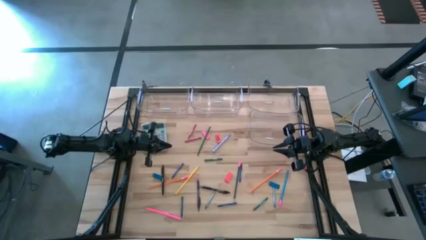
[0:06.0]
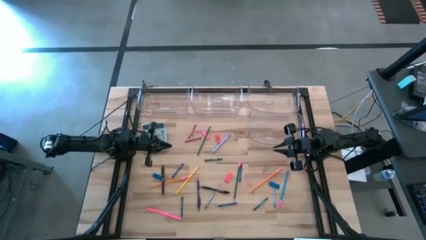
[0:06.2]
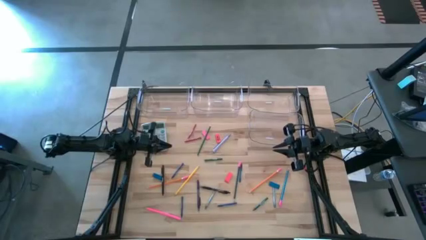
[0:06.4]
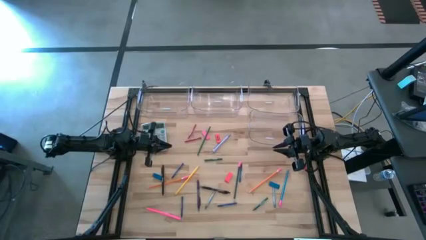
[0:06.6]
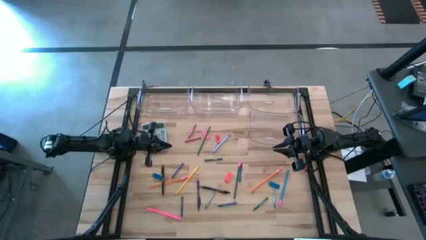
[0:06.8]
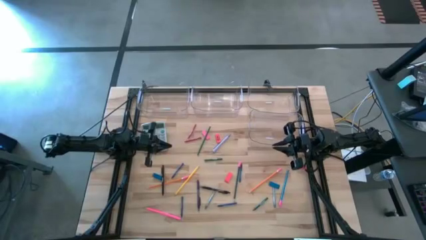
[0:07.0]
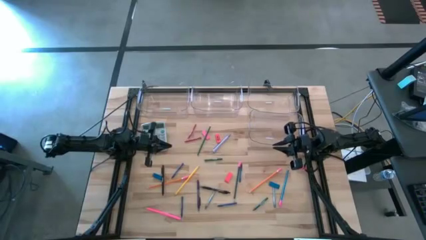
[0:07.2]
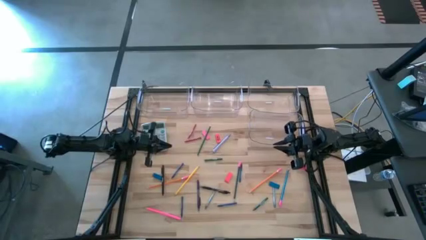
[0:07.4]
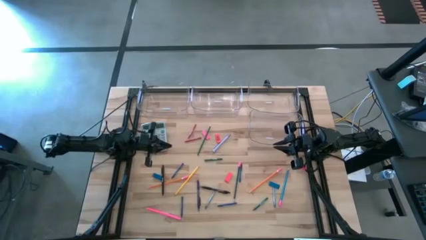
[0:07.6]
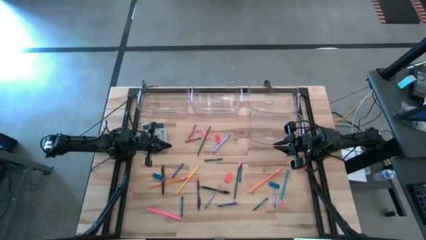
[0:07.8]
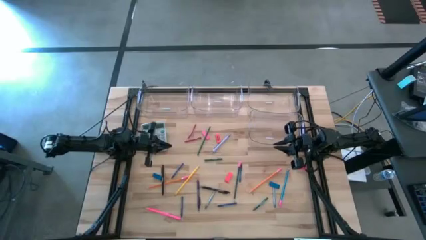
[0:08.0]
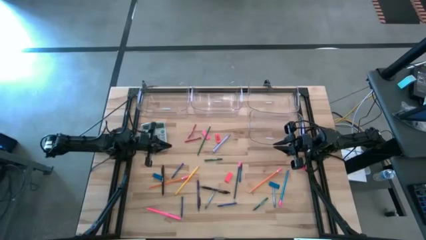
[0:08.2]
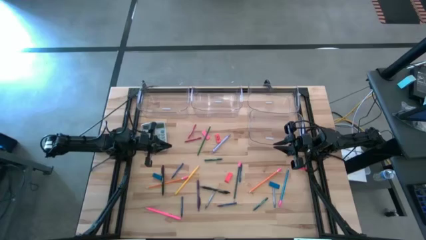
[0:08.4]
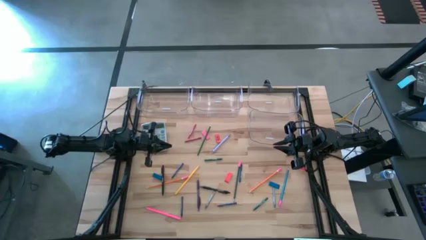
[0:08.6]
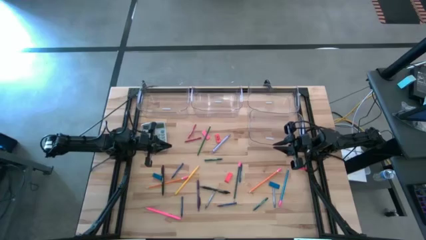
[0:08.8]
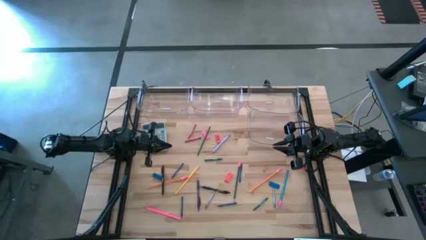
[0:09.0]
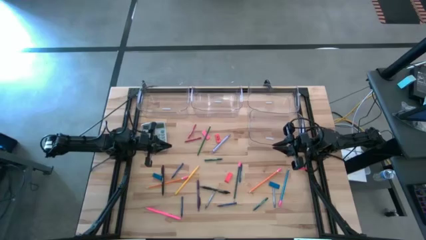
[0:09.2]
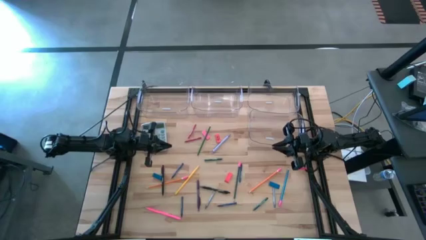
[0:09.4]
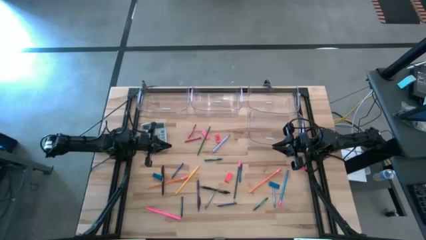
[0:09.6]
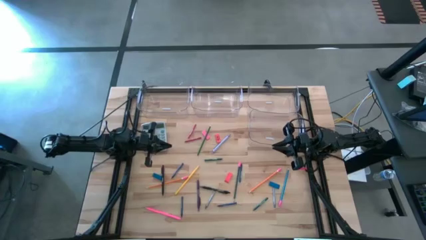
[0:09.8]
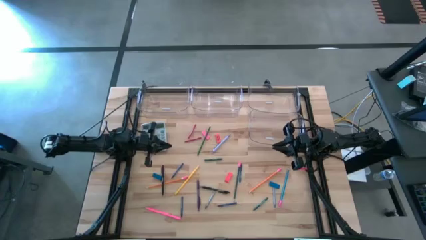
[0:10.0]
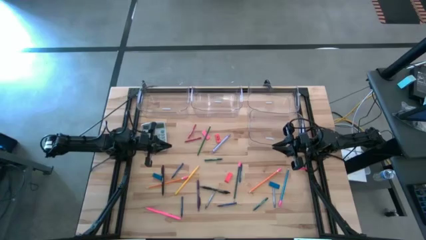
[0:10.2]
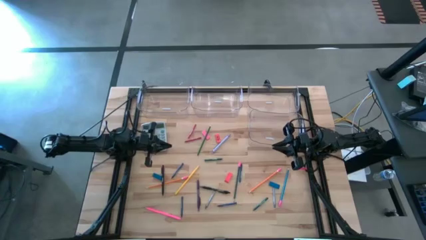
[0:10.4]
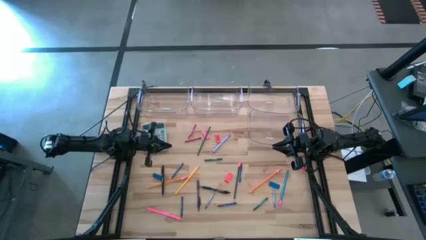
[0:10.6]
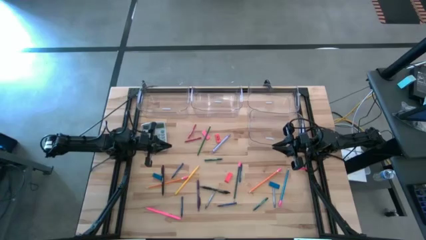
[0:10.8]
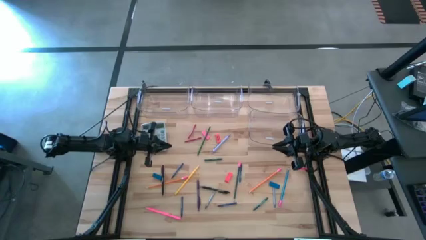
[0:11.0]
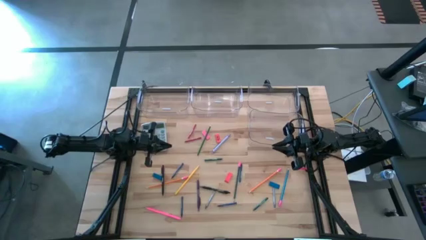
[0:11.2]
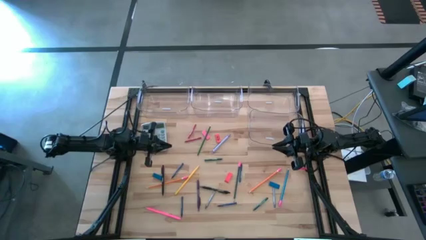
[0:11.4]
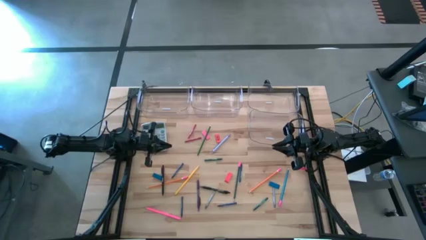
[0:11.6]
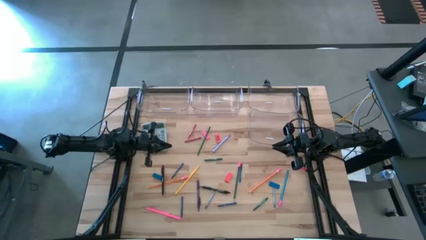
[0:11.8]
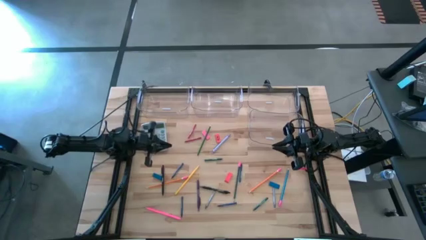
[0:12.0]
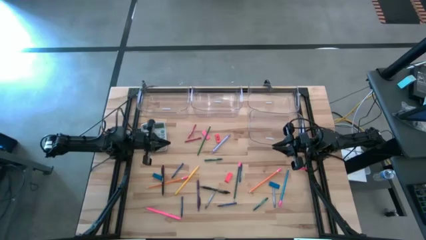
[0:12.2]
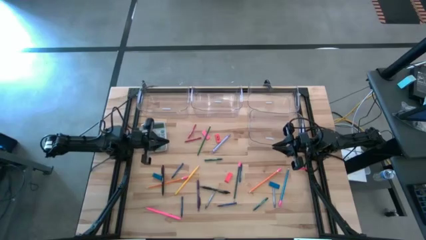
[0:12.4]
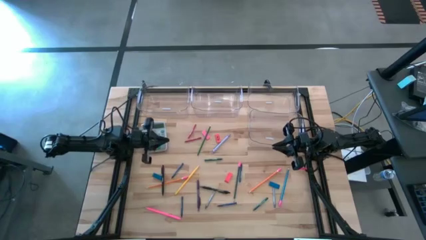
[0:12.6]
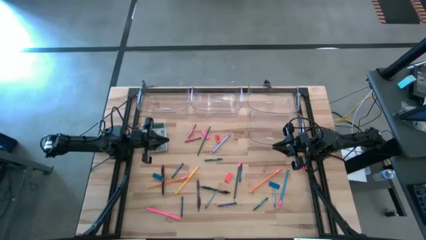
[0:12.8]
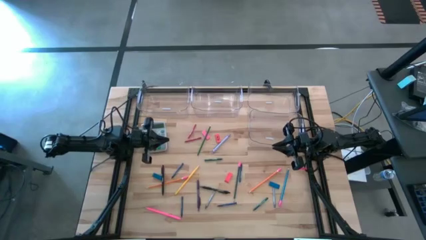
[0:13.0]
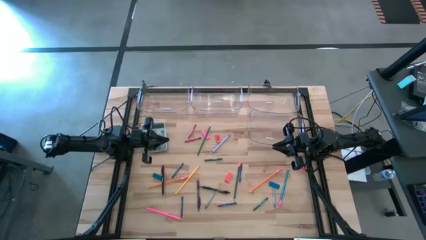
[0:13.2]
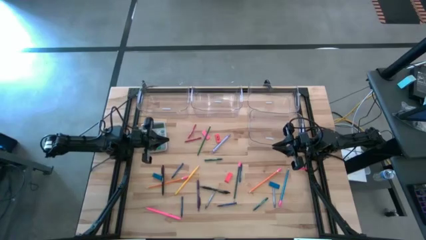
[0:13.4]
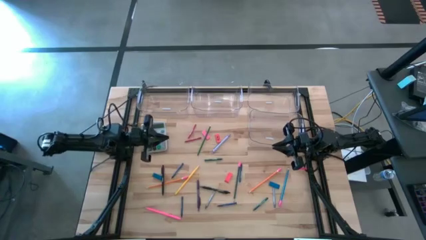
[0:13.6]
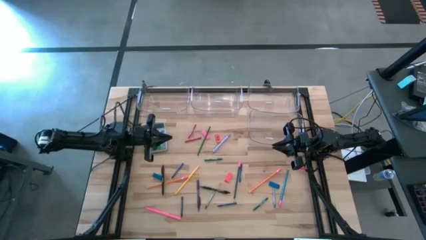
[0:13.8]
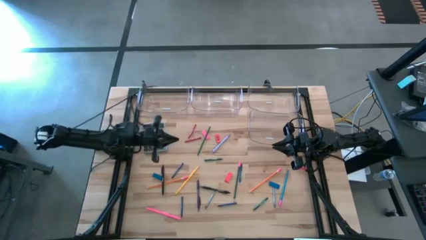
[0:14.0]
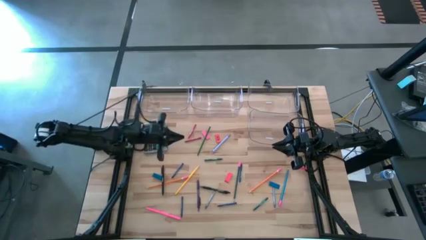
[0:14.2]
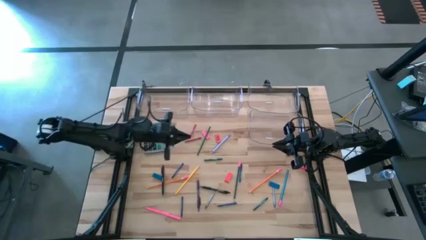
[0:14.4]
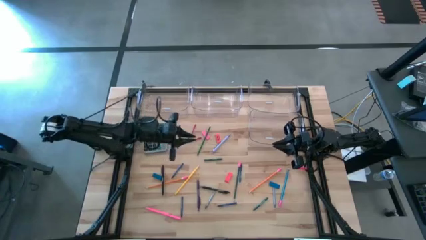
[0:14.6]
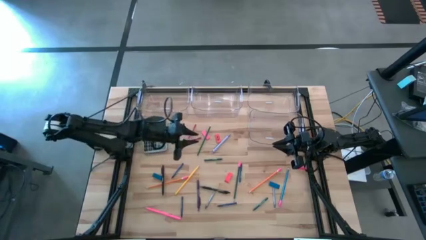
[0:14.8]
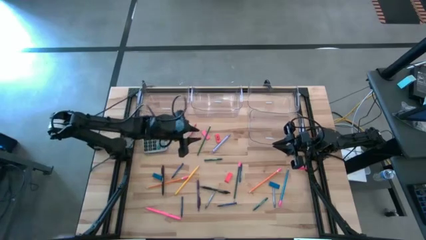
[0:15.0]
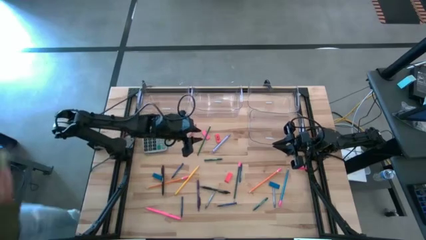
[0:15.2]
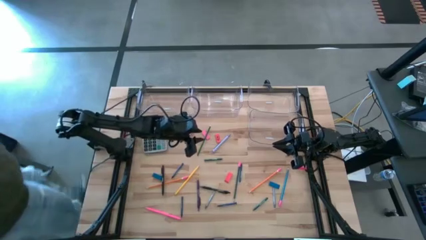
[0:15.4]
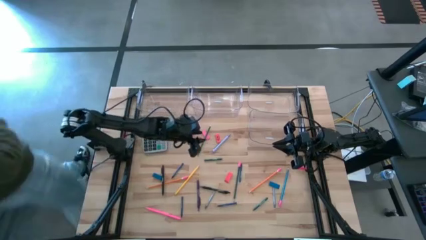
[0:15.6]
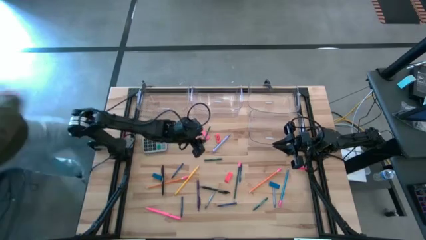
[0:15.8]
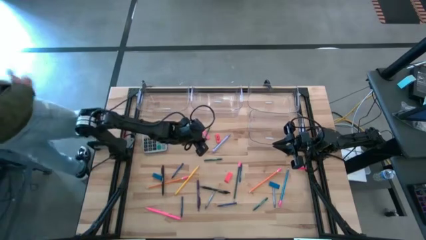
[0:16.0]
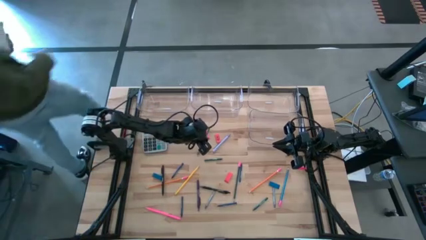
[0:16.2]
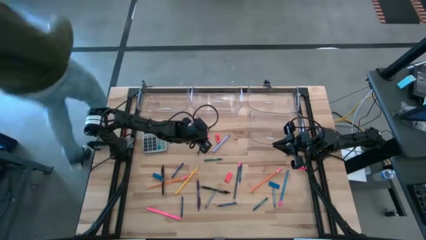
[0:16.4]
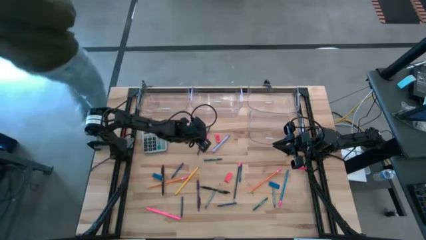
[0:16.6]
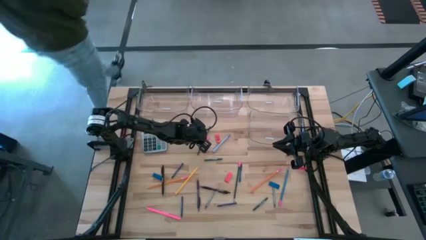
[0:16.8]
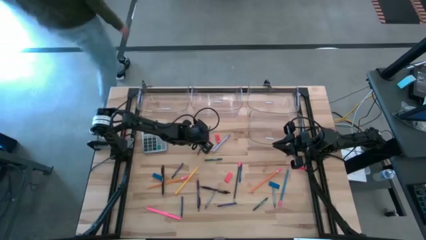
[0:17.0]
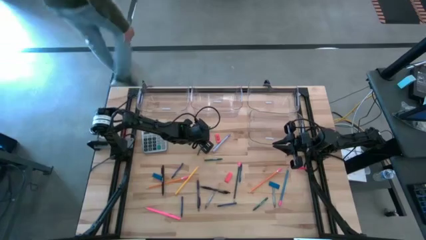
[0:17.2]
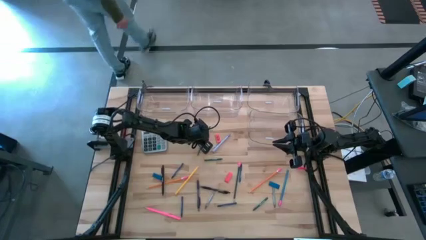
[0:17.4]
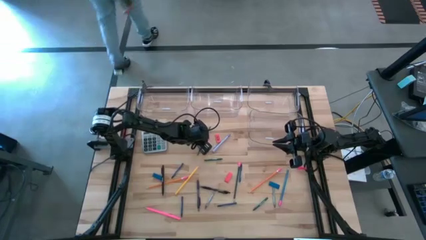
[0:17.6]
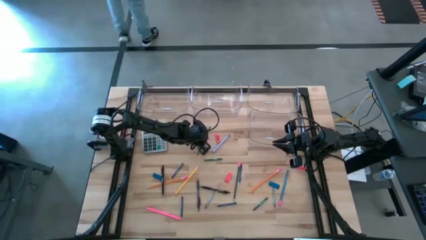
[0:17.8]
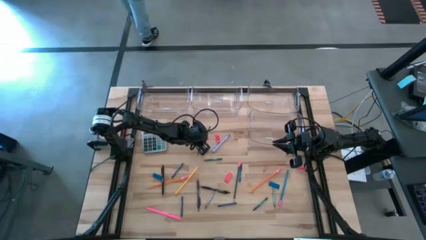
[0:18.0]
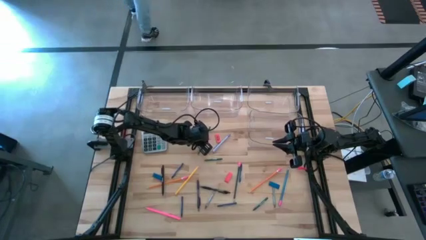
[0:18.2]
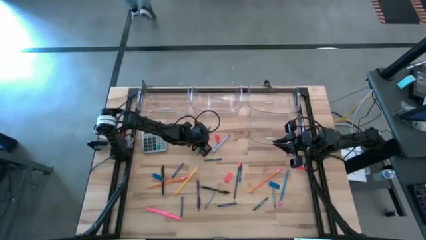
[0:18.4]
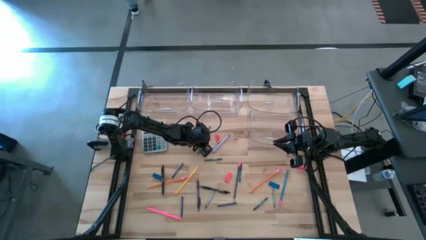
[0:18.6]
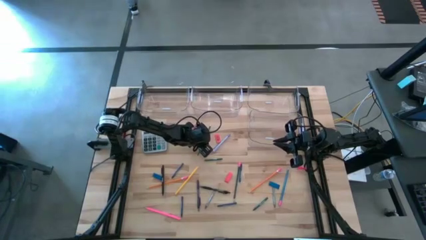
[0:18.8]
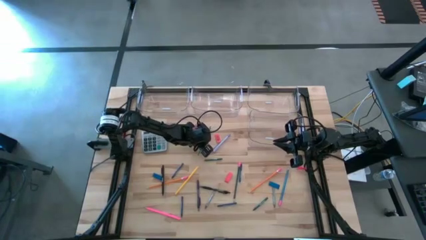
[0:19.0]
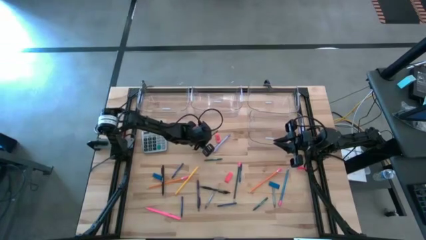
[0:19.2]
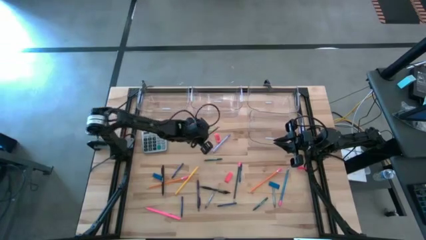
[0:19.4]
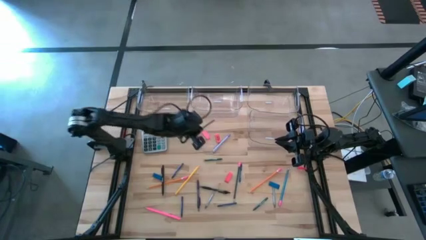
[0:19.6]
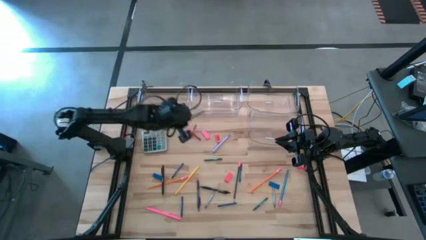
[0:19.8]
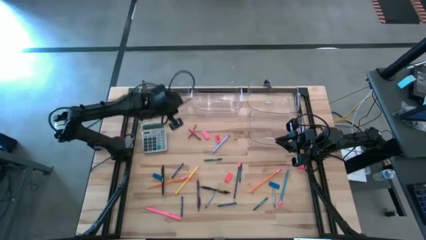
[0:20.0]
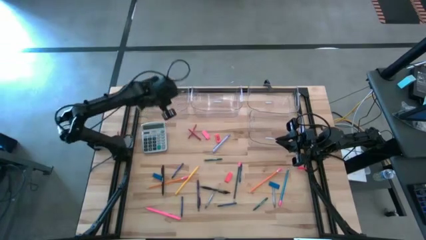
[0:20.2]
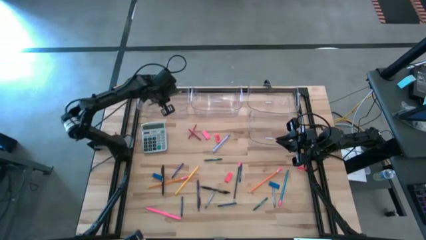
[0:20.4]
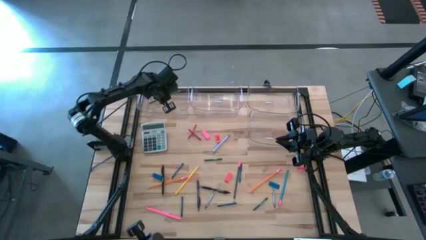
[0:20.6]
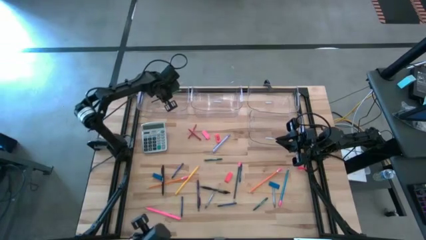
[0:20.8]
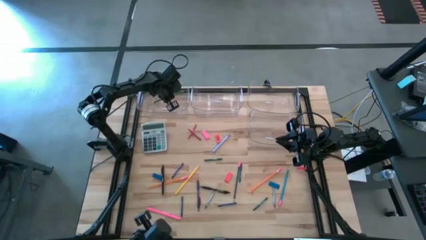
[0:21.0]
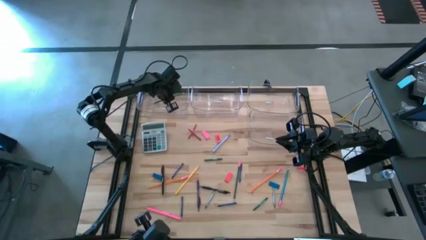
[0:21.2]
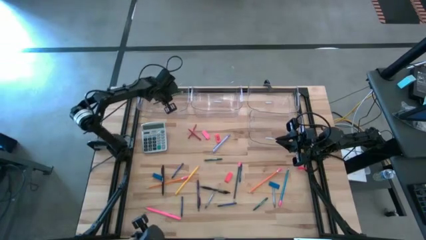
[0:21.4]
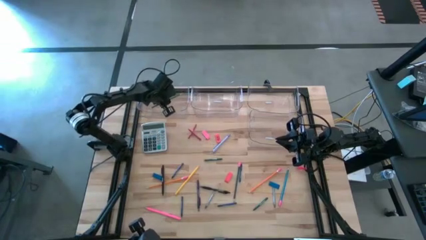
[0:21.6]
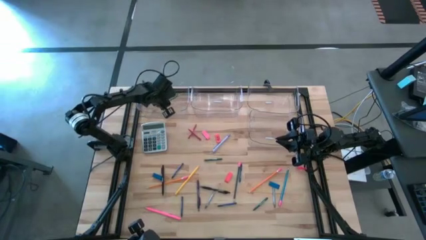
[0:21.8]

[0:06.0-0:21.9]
Task: Sort crayons/erasers/pens/pencils in bins
Put the green pencil into the top left transparent bin

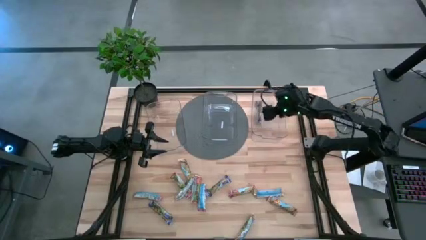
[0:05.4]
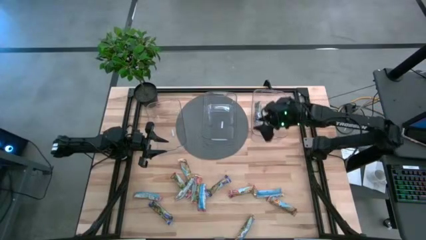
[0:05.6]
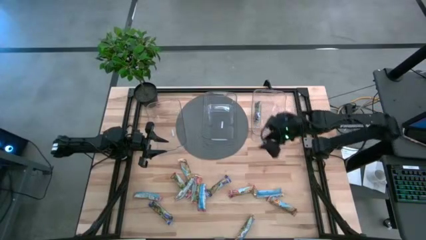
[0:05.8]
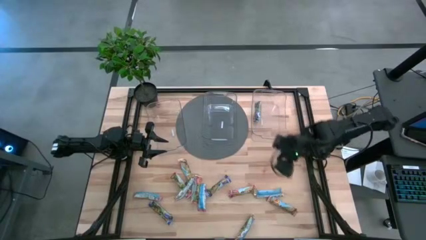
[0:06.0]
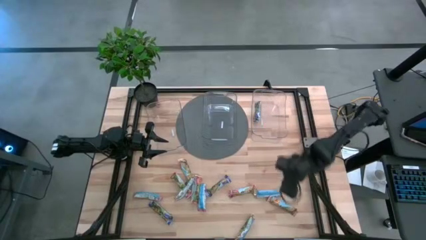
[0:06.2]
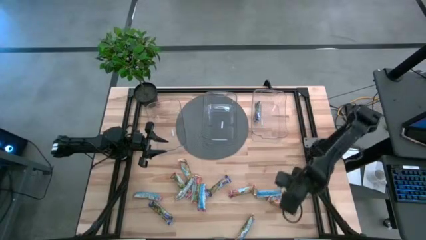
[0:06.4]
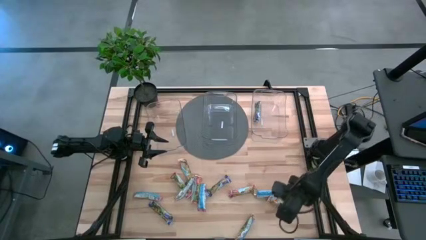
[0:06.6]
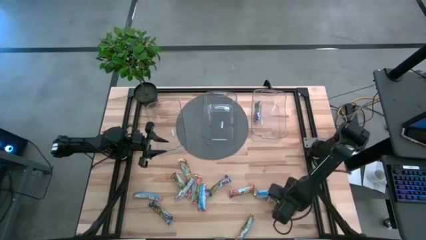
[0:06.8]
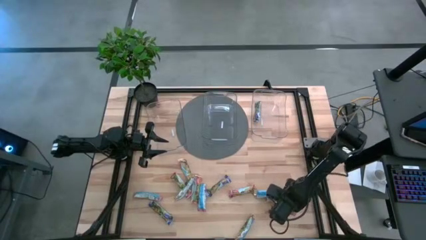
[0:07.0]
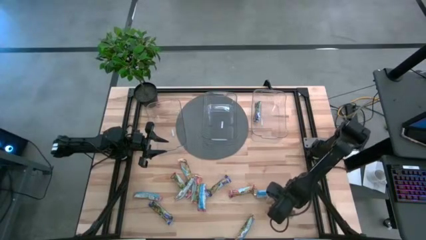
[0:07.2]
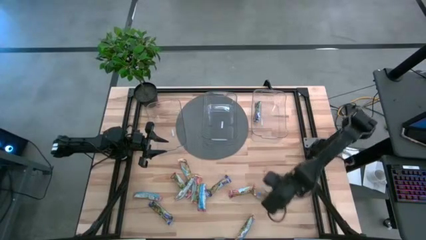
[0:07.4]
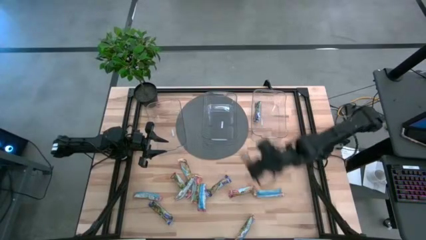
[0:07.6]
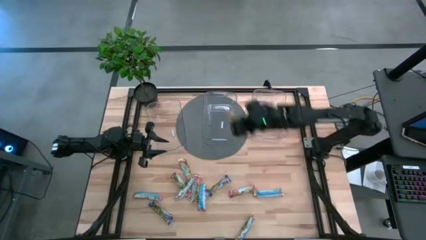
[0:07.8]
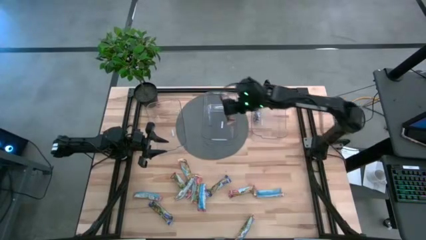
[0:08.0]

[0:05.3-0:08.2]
Task: Pick and place Granola Bars by type
Put the yellow granola bar into the center transparent bin
